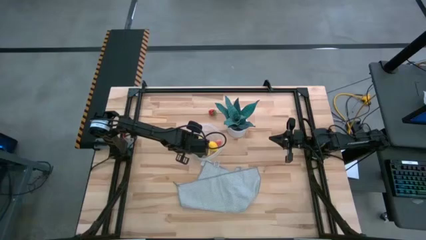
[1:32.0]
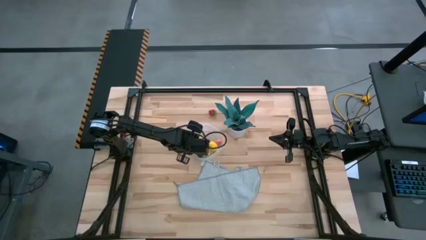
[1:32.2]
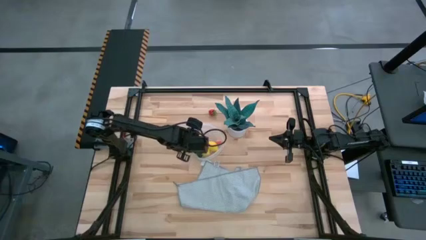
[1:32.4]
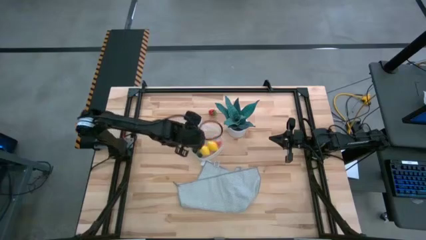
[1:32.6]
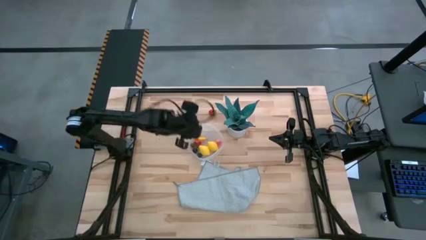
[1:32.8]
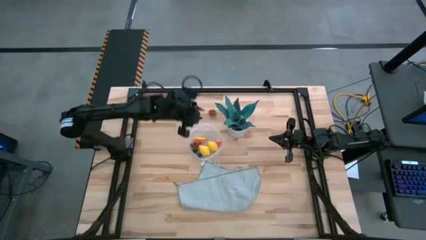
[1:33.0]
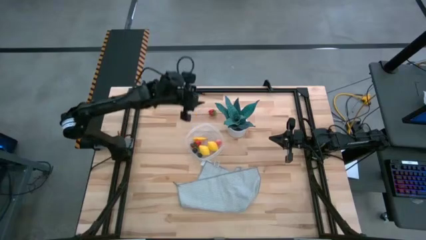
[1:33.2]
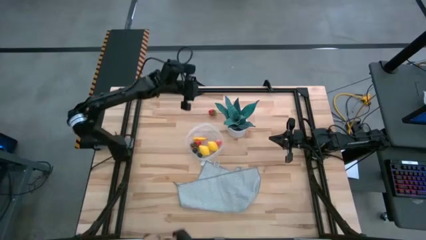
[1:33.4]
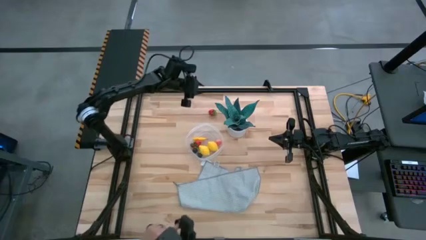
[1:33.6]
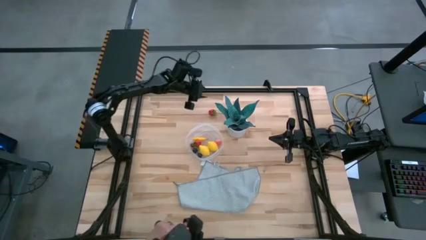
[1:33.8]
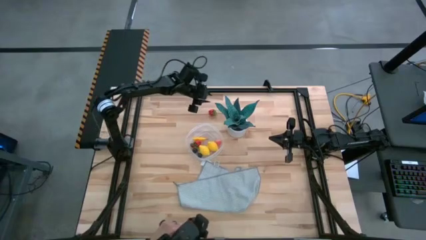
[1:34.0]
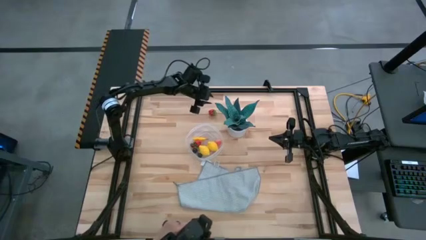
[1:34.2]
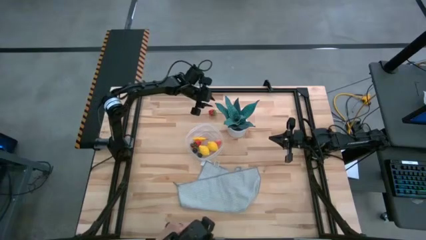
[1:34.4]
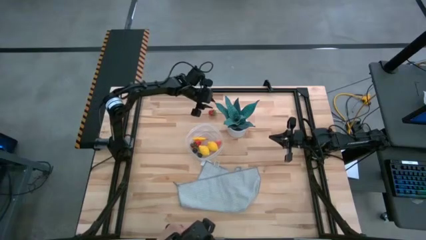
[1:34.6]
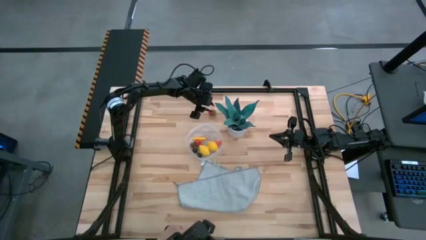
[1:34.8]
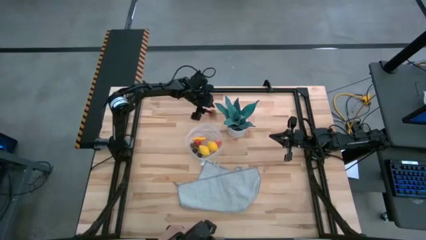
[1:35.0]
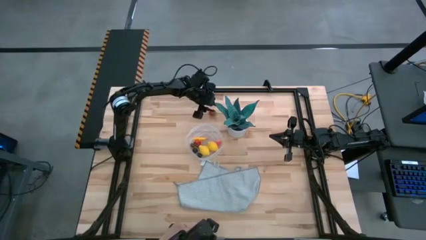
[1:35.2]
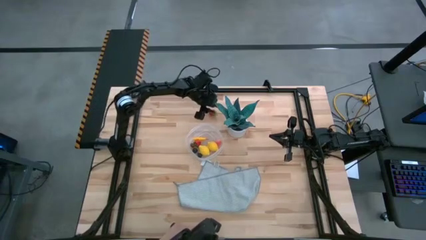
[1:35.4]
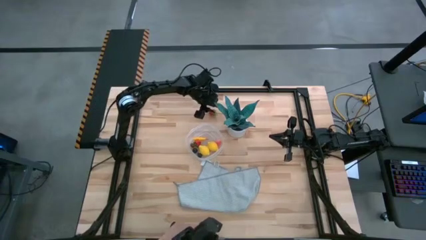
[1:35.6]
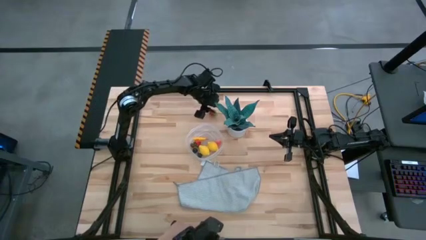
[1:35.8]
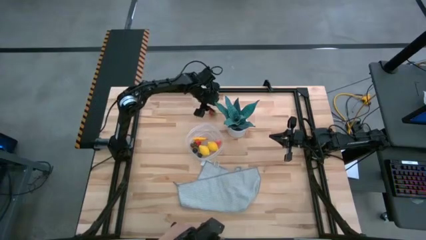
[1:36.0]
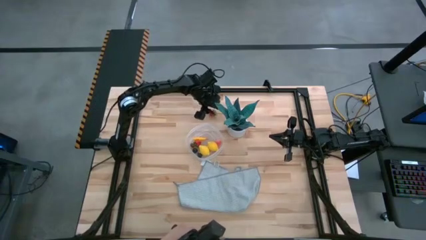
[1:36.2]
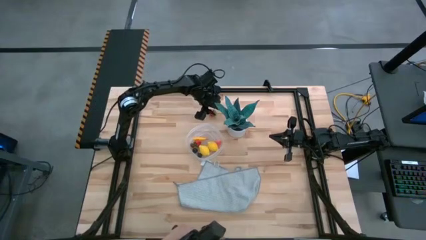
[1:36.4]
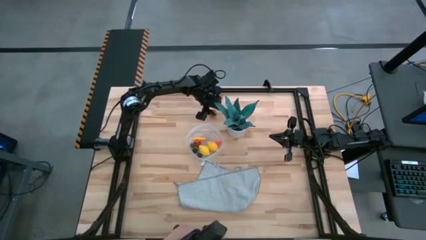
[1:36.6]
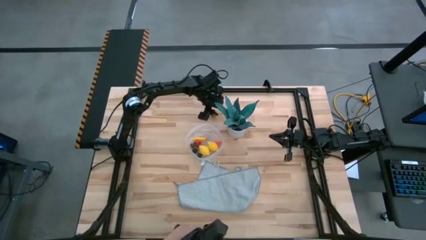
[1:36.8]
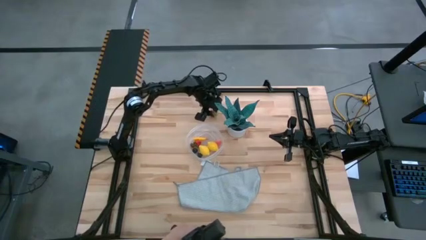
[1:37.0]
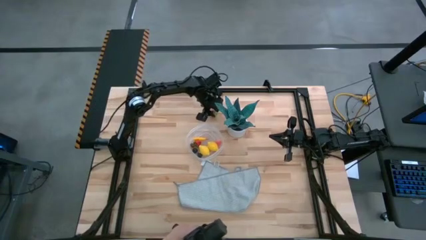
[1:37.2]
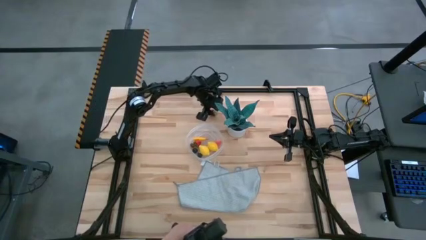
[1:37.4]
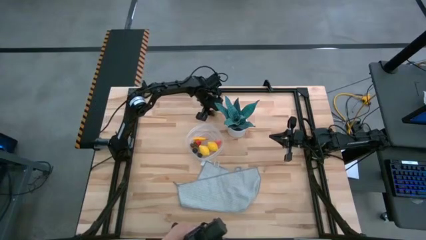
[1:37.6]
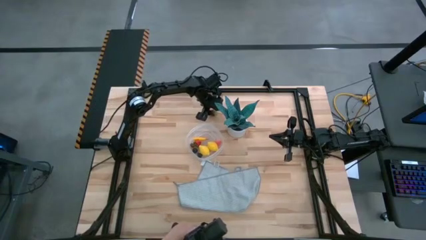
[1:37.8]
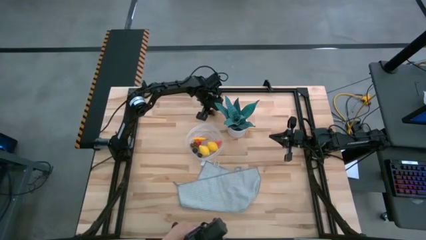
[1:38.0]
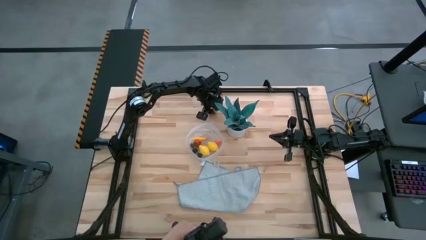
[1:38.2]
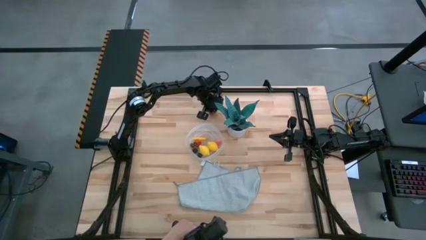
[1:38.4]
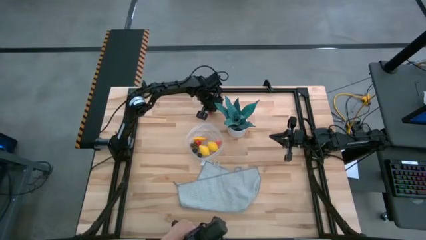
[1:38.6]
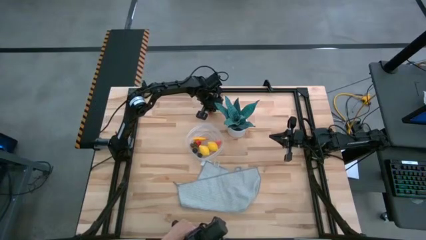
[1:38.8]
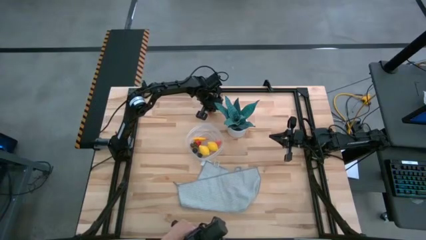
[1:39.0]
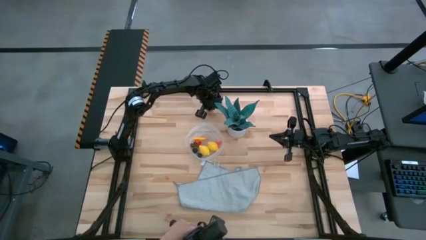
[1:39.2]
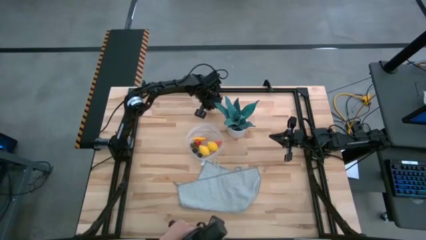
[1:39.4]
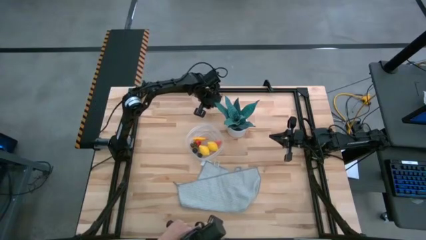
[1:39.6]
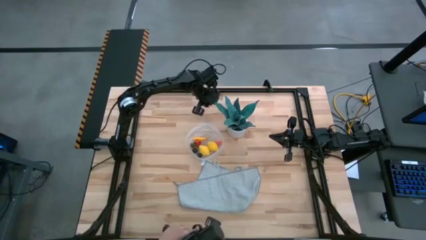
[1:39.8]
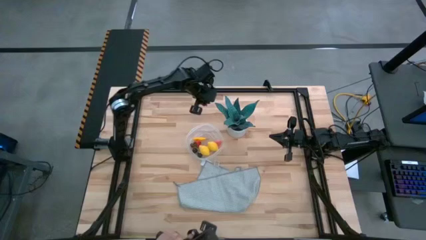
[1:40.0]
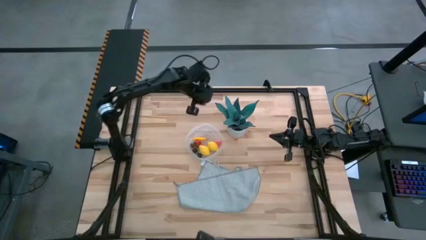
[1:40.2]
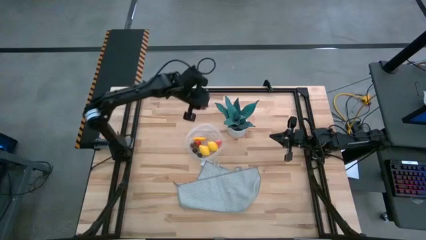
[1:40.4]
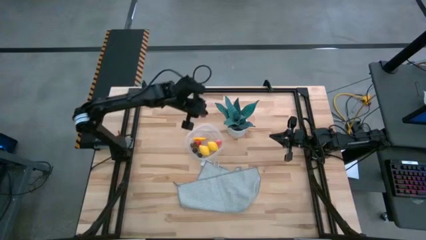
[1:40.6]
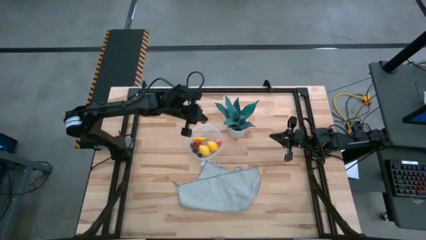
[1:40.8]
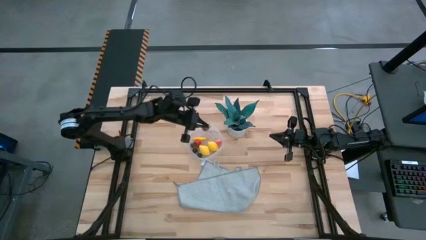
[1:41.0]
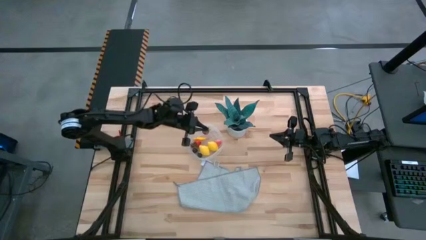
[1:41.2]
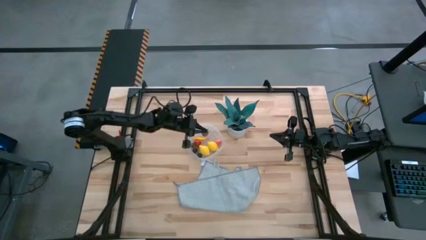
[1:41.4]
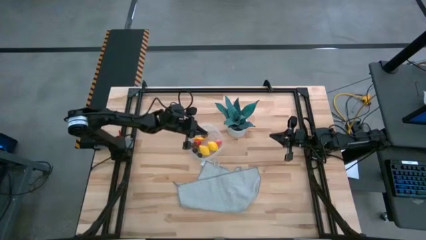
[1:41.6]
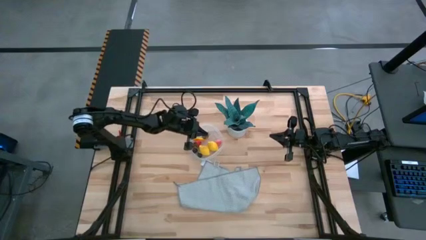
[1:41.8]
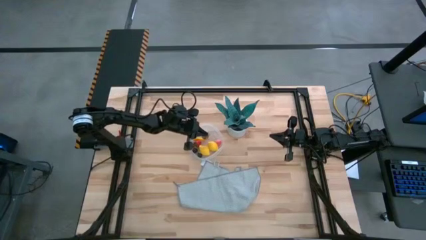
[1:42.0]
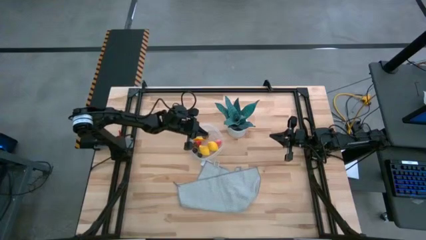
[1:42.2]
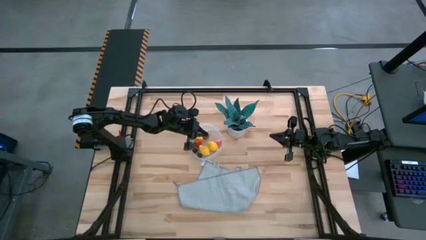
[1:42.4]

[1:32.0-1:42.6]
Task: Pick and placing Produce into tupperware
Put the red strawberry into the container
